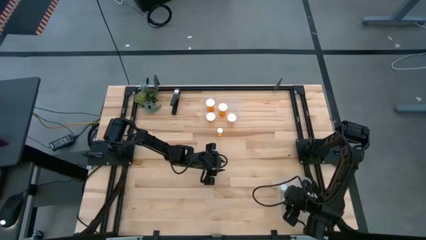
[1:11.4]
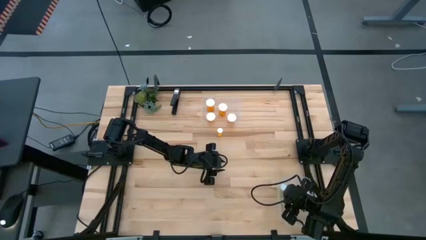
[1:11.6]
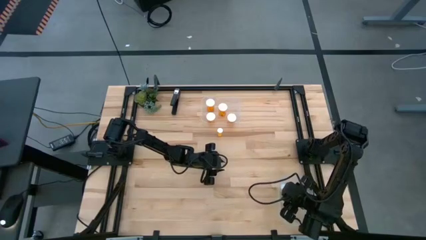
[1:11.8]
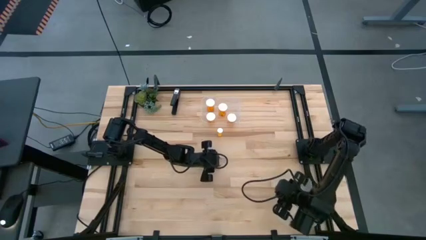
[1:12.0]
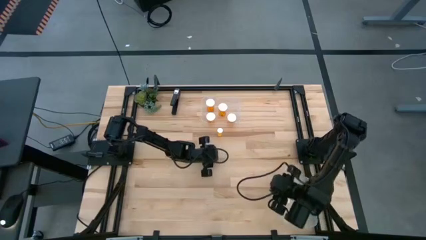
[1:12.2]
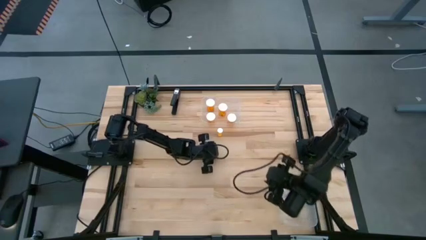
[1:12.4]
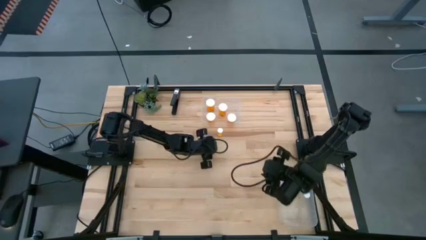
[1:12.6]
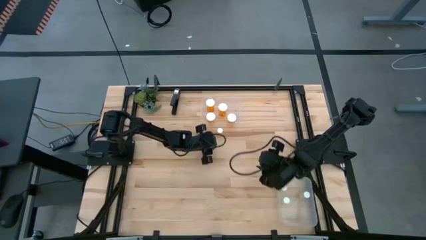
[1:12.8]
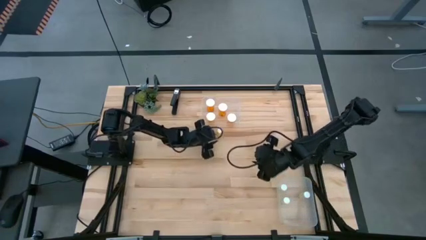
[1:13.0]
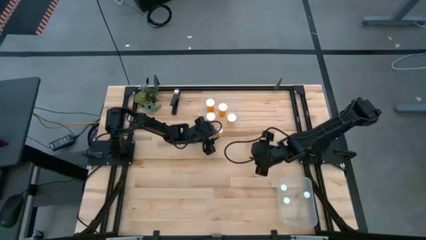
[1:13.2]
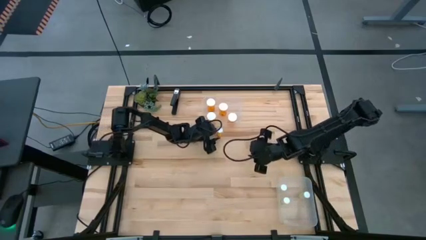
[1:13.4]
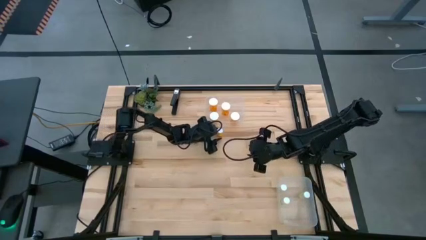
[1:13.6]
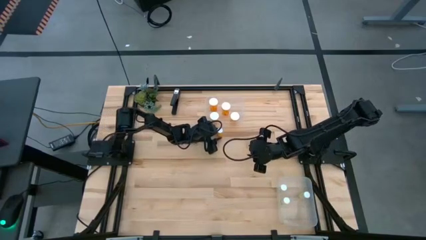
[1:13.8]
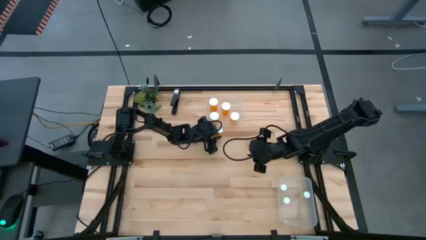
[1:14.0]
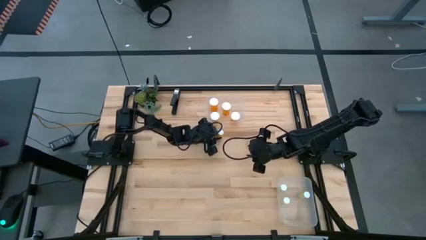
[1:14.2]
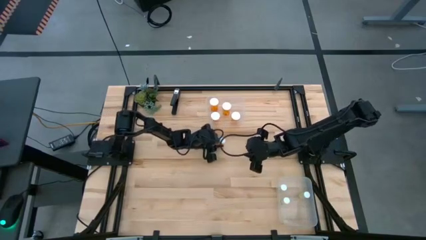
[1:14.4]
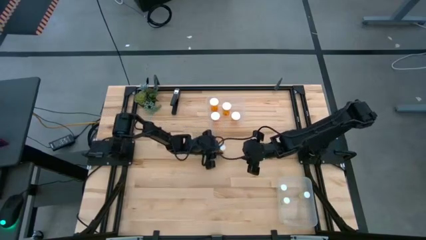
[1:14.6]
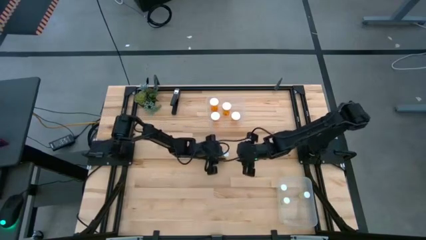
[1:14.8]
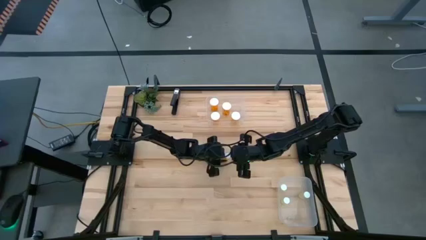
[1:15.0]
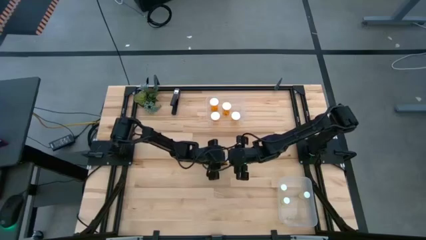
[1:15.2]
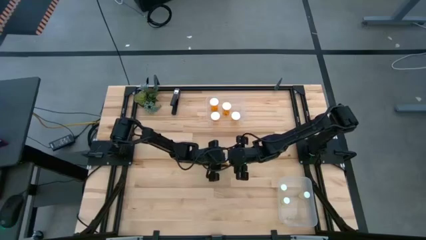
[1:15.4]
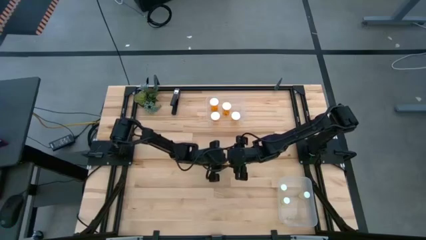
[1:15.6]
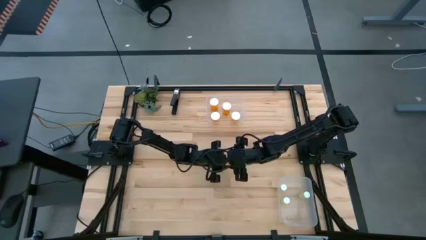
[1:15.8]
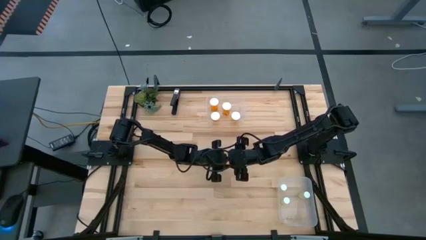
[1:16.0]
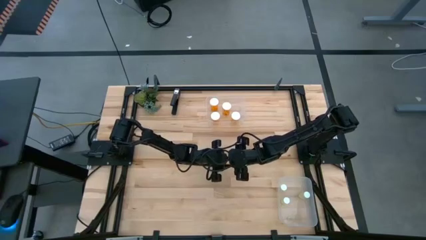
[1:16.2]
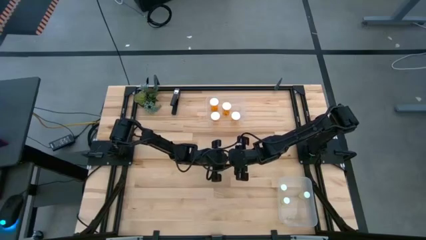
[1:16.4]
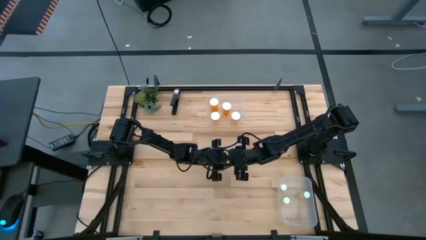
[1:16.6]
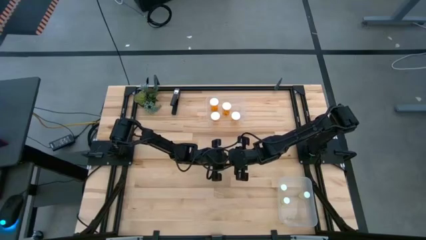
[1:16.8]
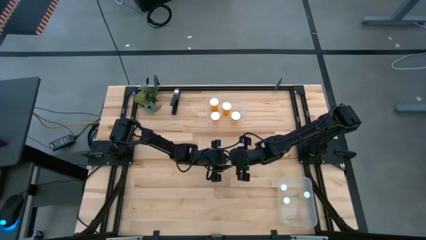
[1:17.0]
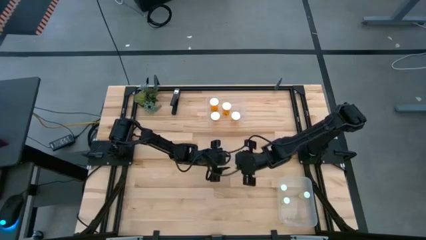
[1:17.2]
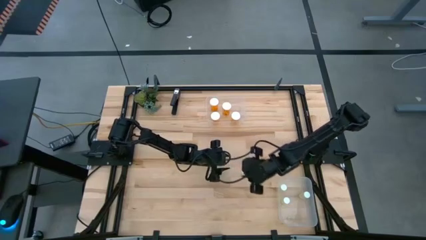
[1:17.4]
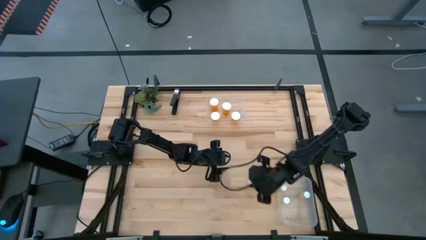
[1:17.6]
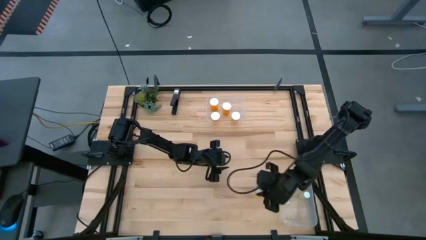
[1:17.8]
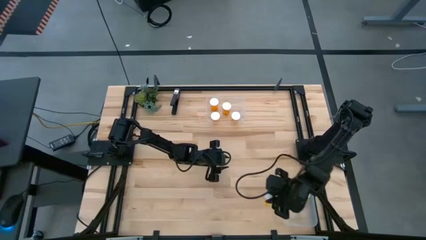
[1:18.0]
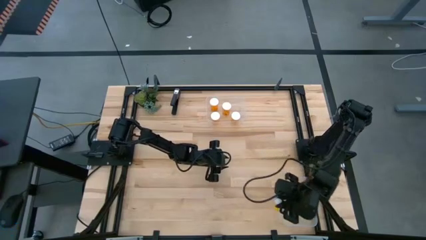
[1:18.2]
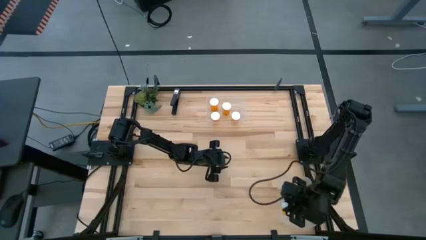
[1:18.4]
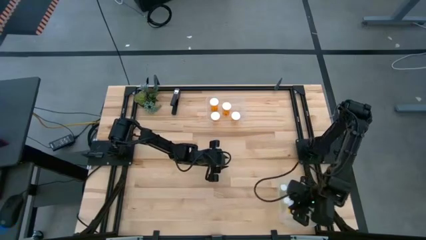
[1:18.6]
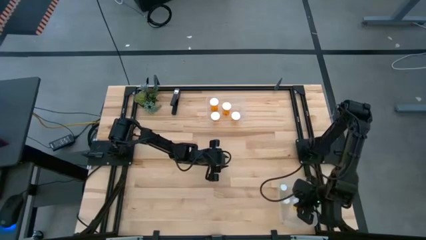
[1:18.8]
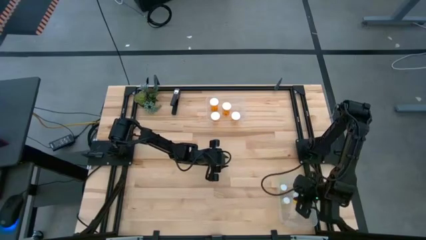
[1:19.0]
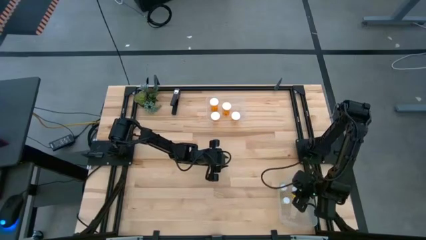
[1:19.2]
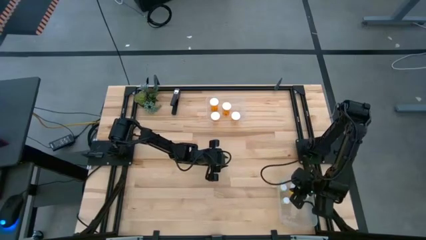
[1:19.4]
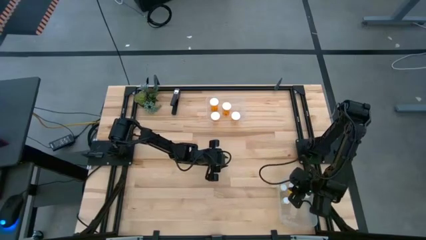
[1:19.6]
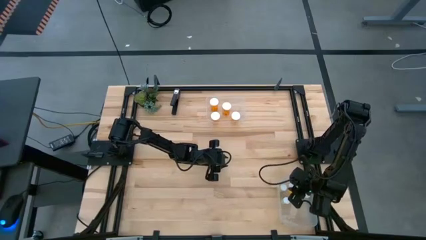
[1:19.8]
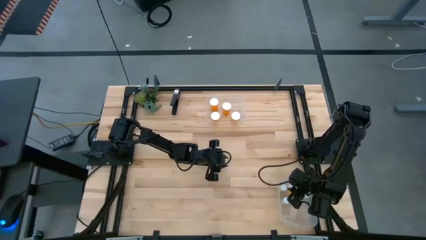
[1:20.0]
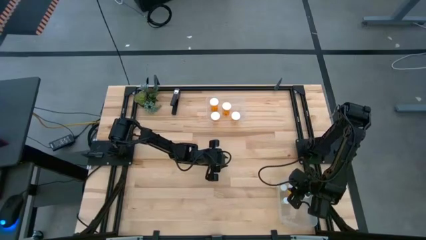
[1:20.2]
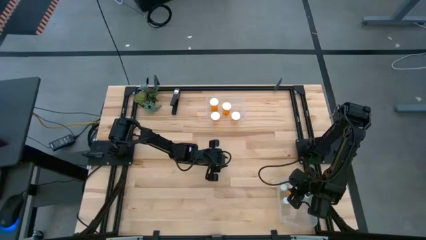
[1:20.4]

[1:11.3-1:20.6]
Task: Pick and place medicine bottles into bin by pill shape (circle, oval)
Put the orange tablet bottle into the bottom transparent bin

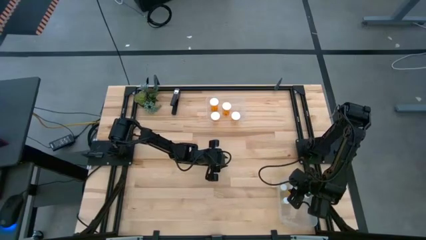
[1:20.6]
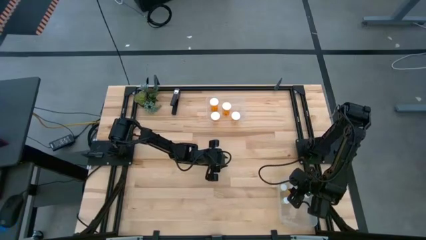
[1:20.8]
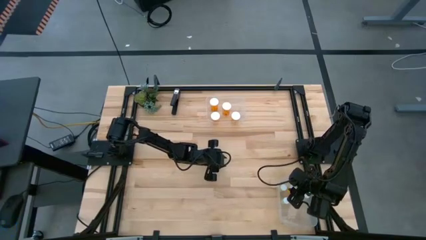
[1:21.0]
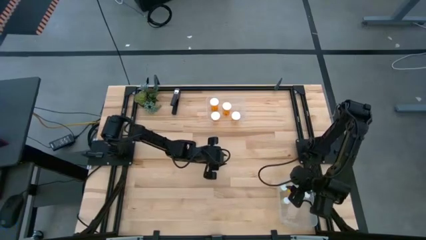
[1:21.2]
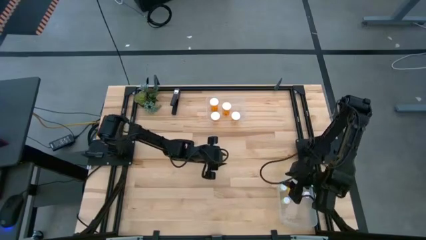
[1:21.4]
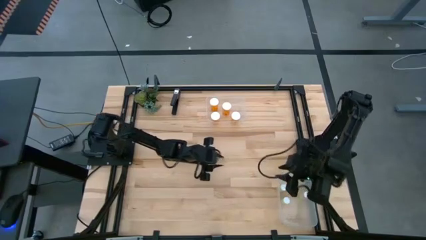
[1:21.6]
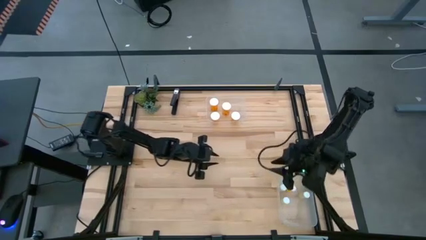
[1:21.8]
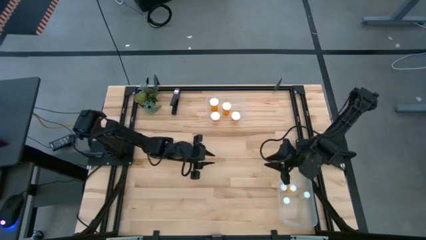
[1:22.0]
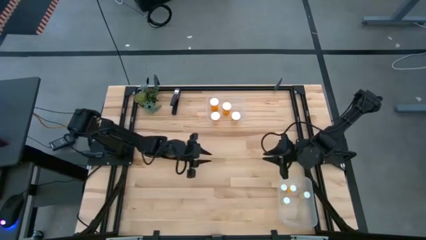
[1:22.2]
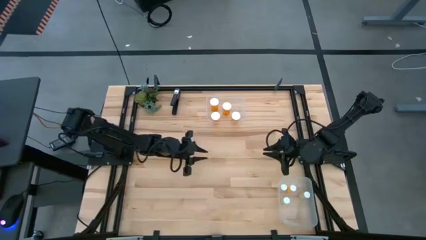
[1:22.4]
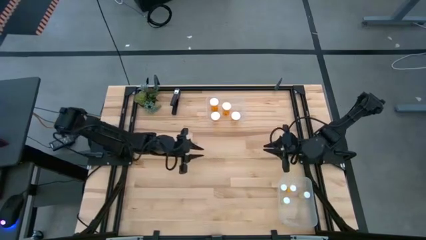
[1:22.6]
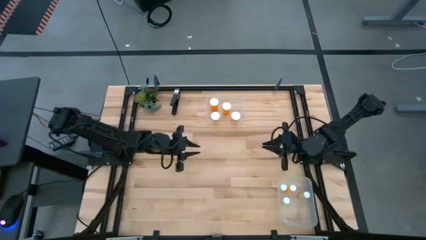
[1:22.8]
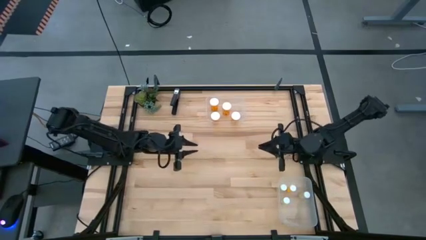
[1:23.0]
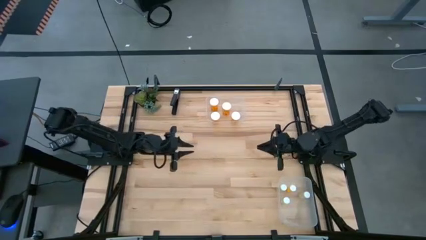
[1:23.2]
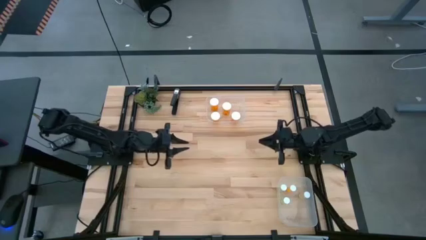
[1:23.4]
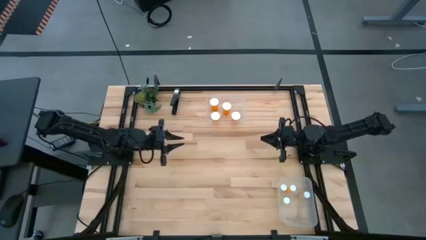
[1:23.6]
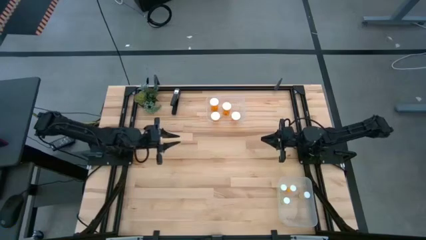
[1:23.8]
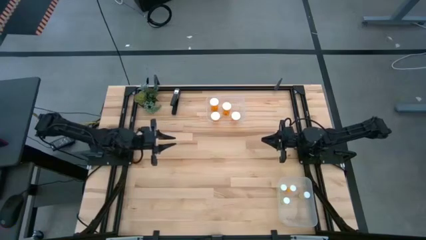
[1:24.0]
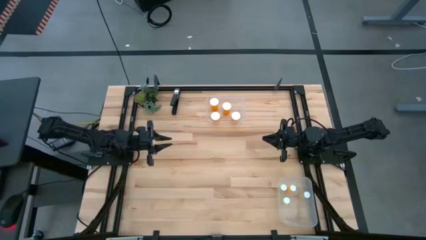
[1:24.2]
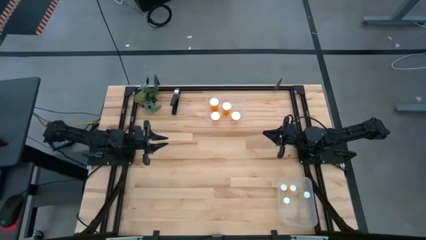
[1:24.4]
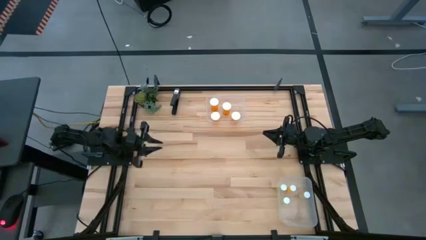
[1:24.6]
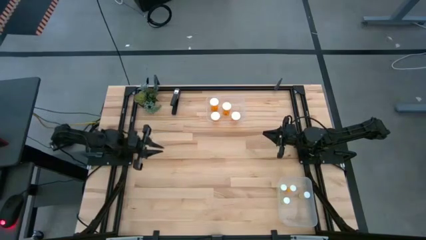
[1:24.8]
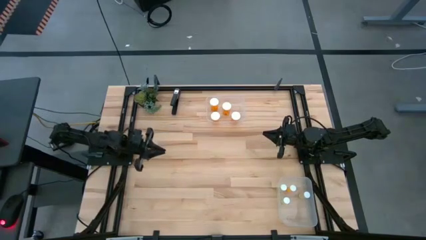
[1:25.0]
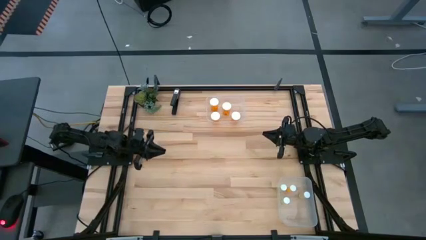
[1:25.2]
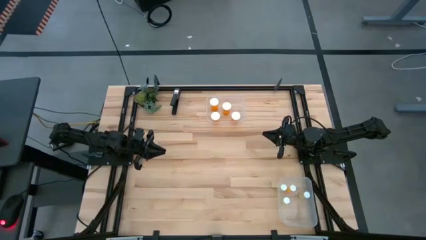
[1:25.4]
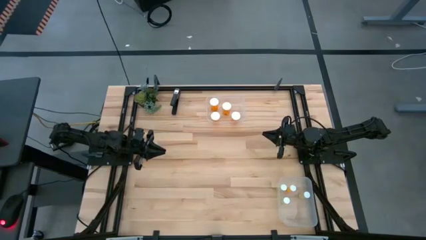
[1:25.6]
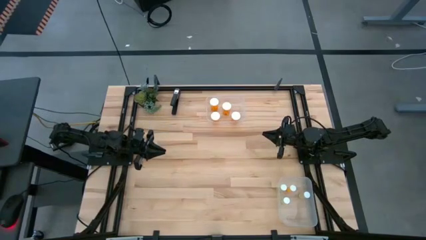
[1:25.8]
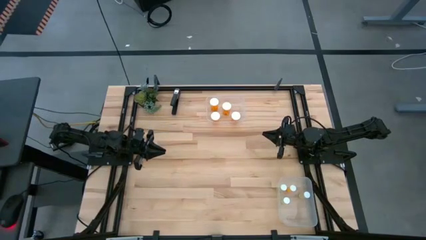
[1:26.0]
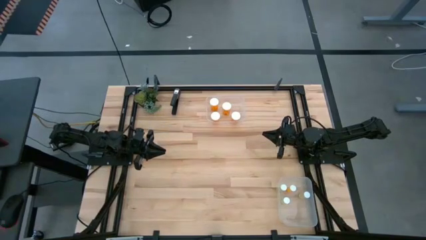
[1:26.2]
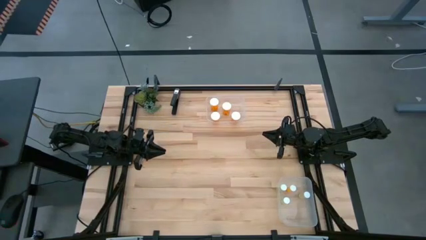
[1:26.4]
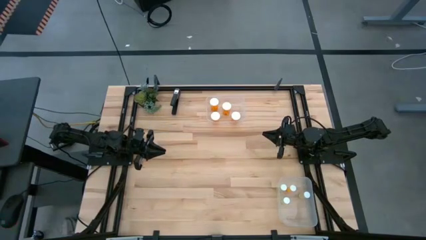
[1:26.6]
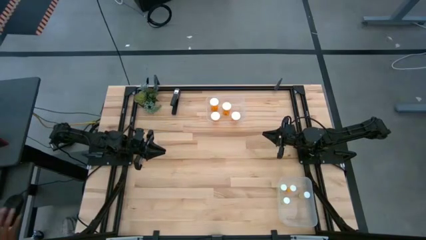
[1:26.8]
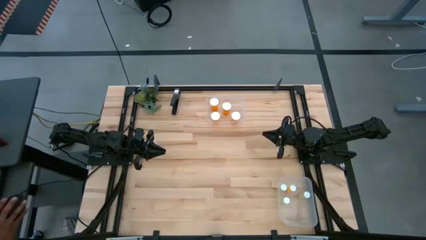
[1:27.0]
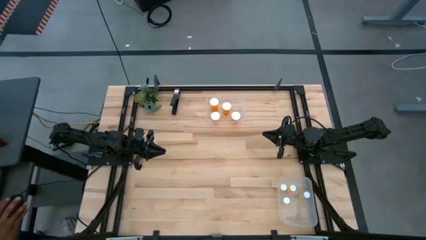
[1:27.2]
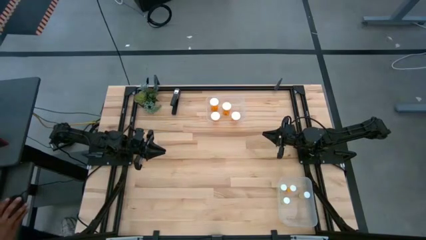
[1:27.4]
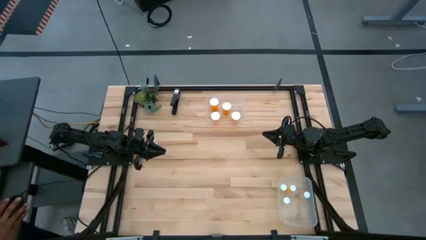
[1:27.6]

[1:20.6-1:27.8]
Return to Home Position
